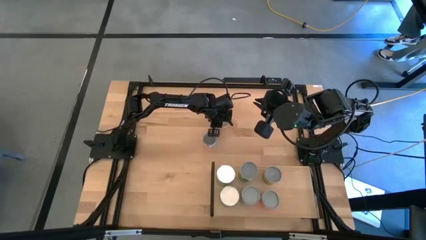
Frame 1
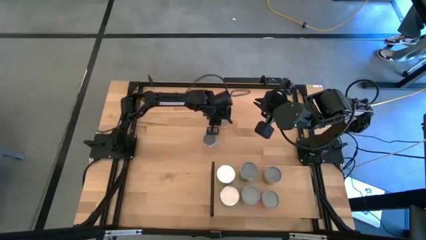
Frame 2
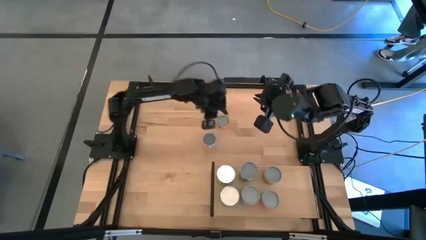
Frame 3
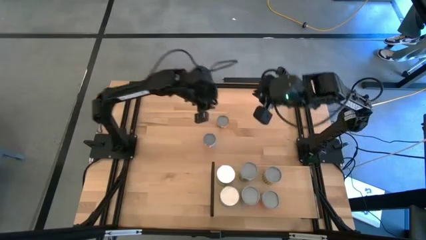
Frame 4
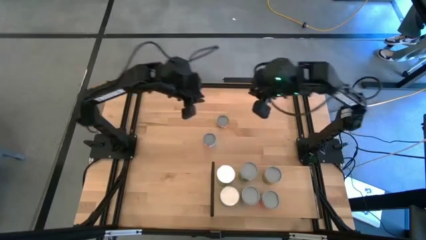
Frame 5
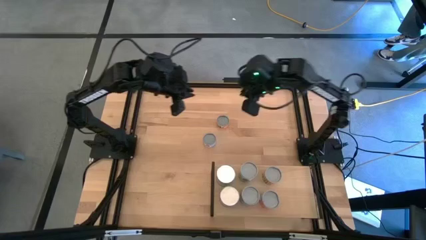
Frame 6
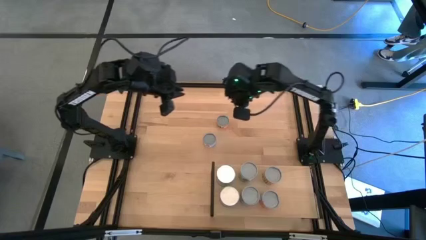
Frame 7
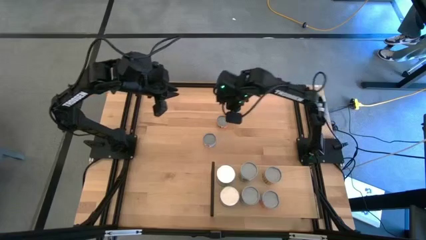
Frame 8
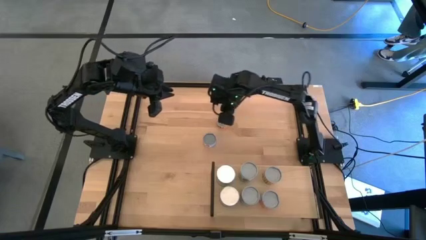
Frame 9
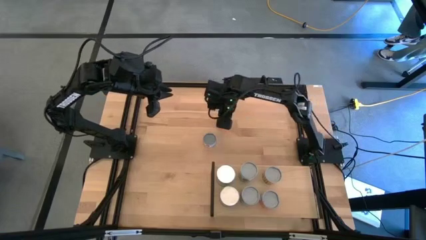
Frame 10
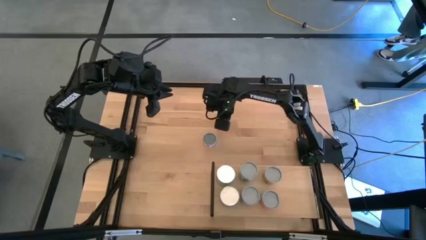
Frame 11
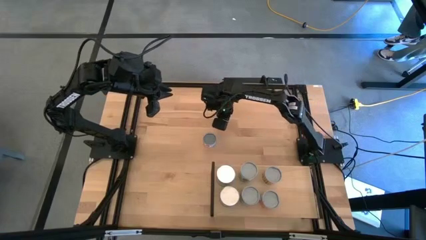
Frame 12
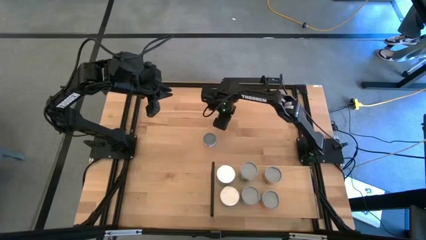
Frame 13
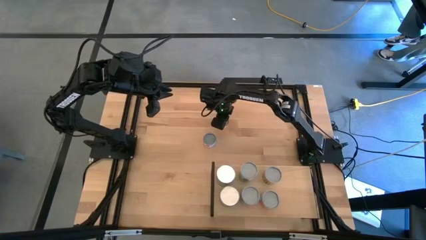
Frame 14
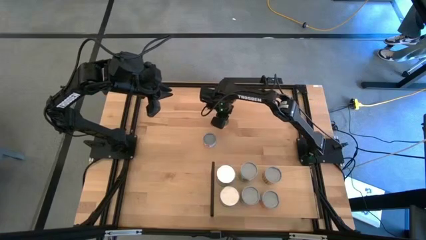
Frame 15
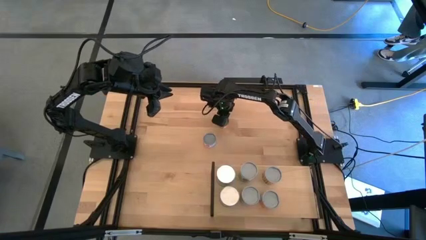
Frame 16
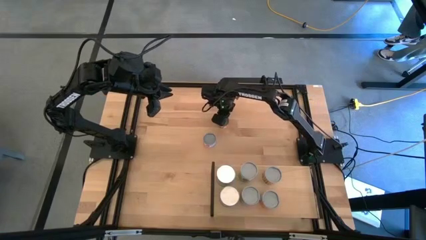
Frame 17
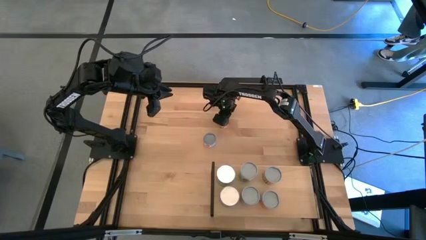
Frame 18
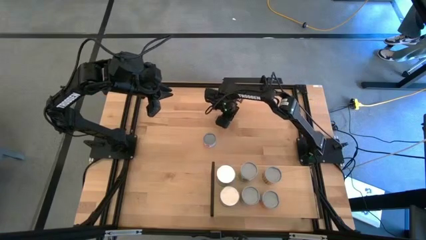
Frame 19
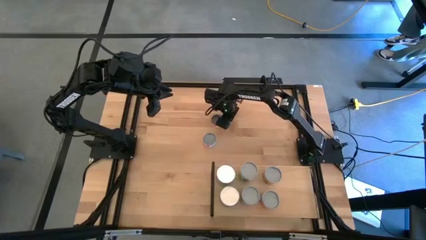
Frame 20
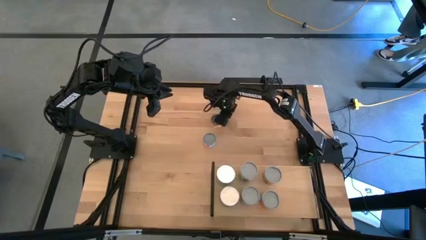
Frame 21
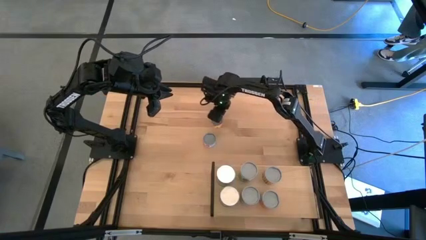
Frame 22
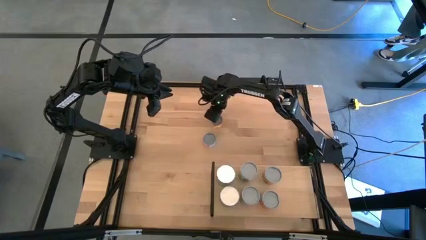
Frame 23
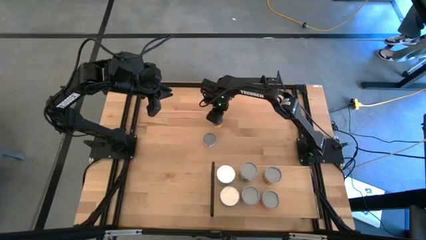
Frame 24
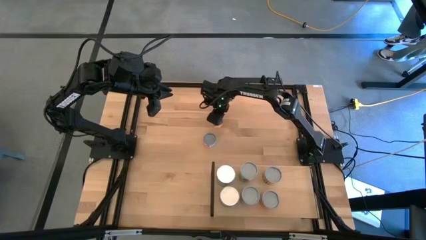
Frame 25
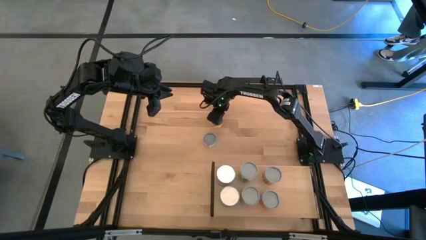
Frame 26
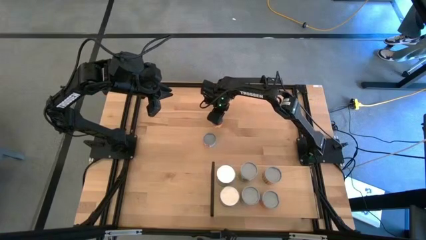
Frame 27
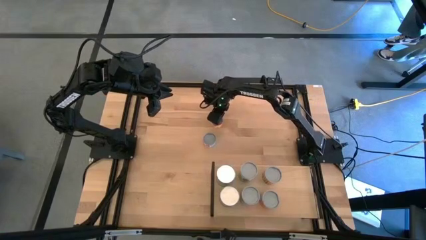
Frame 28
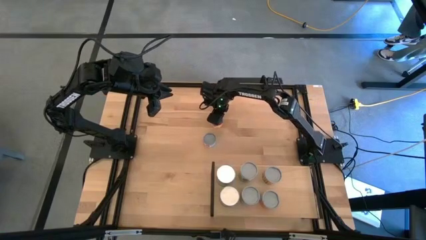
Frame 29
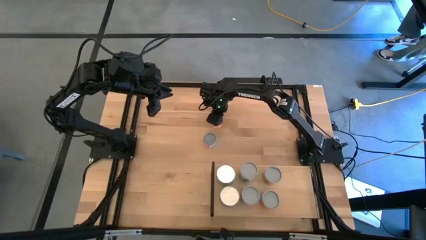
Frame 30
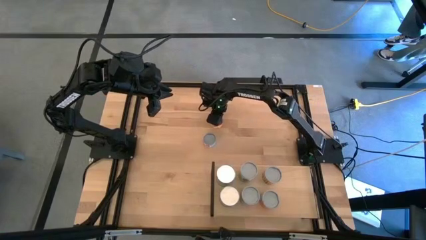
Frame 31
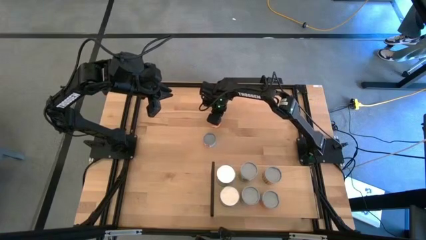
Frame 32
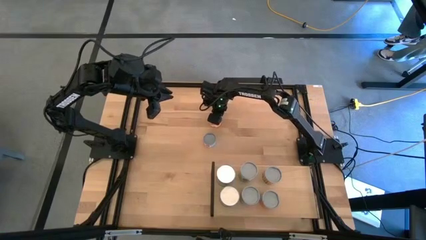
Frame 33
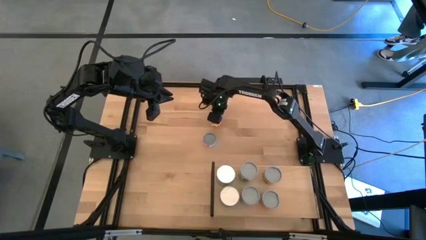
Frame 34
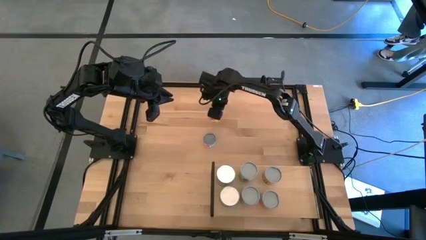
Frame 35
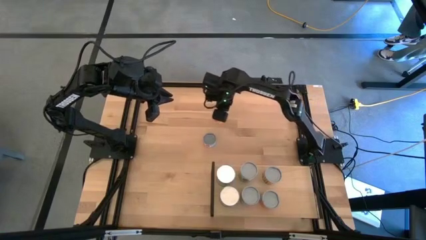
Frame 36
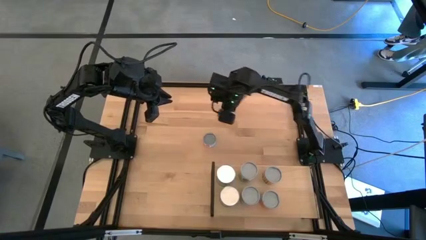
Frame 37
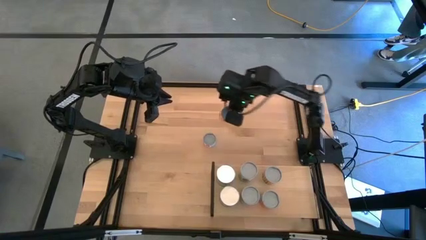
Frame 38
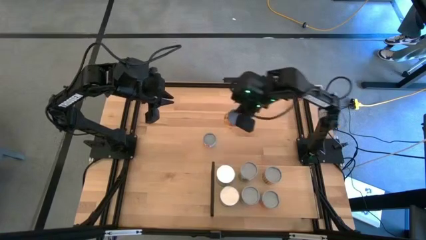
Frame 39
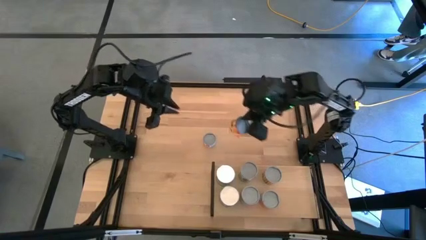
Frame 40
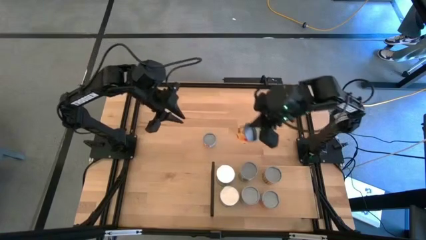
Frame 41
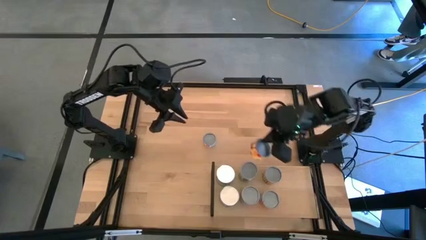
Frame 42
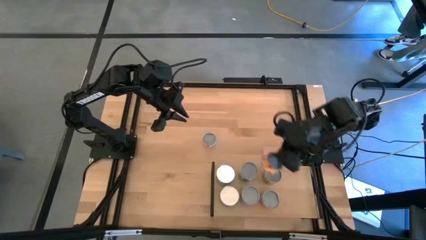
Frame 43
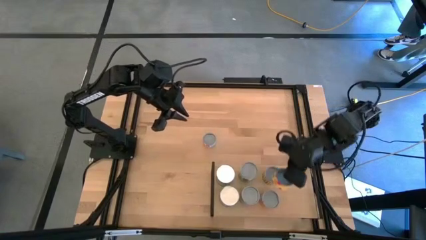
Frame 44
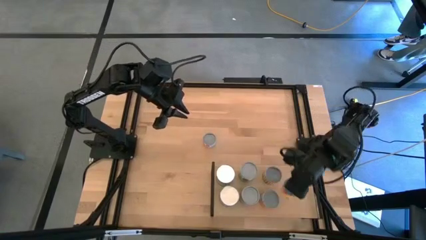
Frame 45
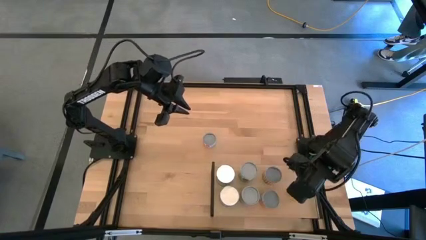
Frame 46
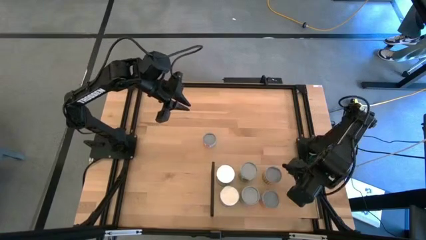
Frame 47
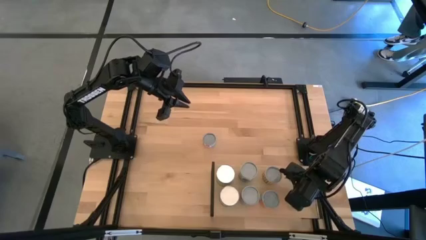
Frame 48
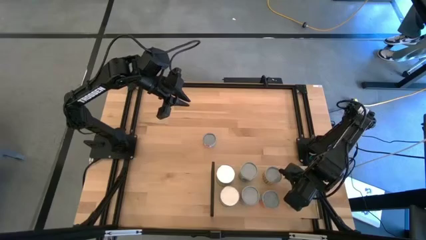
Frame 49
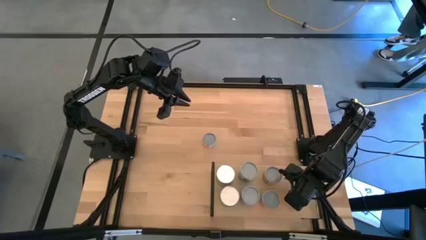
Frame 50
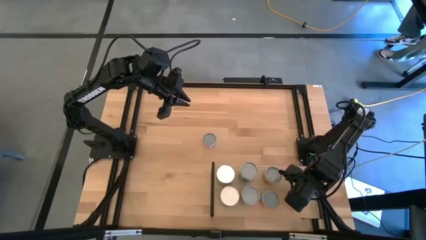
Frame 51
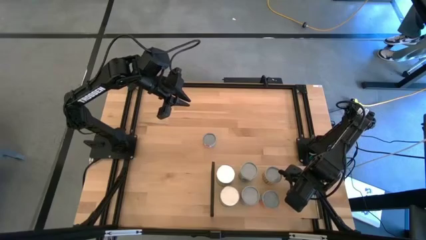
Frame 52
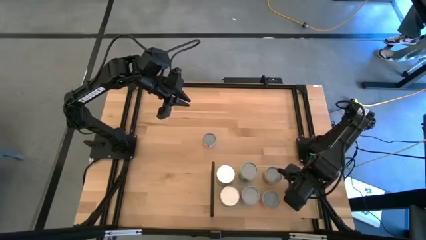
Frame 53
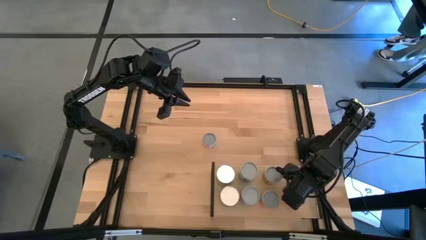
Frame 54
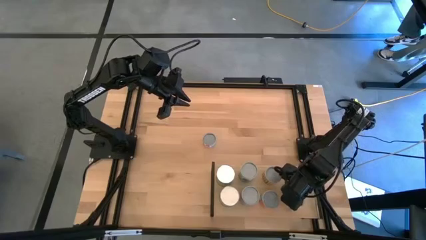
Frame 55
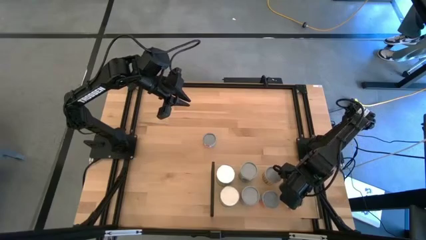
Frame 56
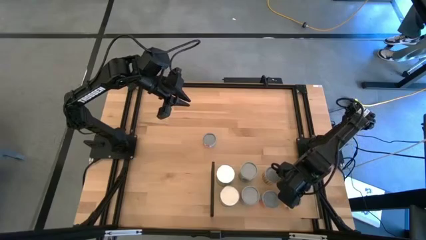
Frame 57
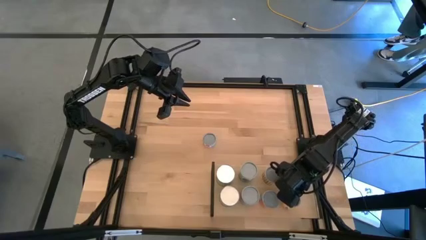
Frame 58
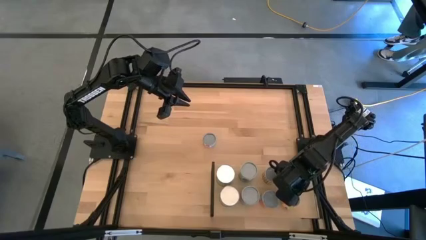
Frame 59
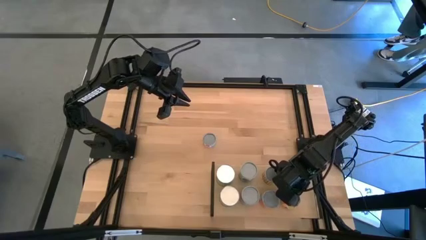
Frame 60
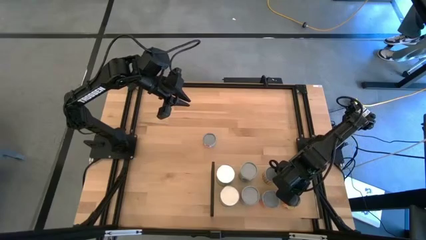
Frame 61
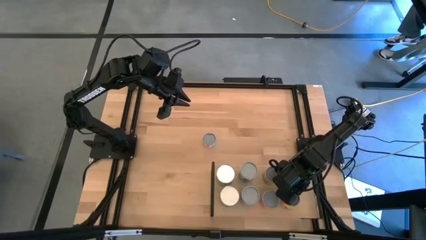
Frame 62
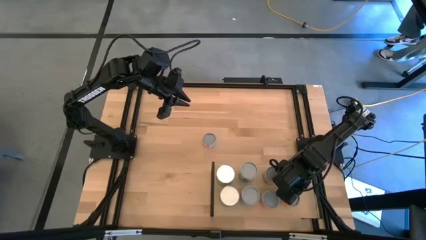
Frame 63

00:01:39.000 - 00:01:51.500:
Task: Pick and place cans onto a shelf
Put the canned pineapple rings on the shelf
